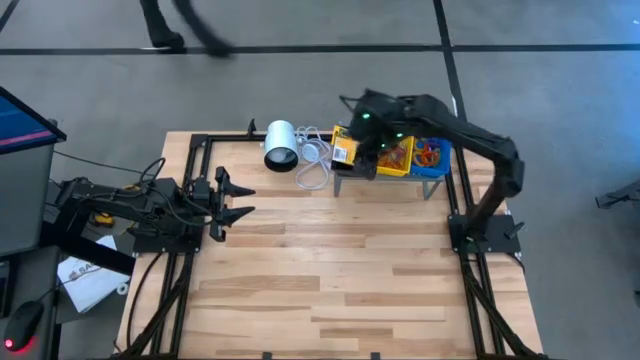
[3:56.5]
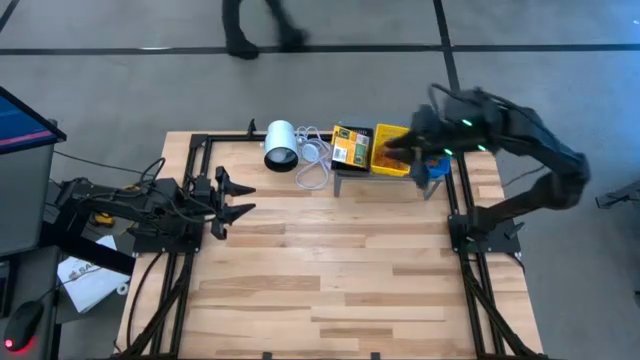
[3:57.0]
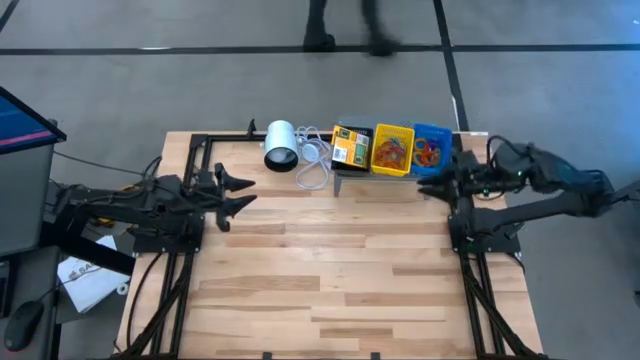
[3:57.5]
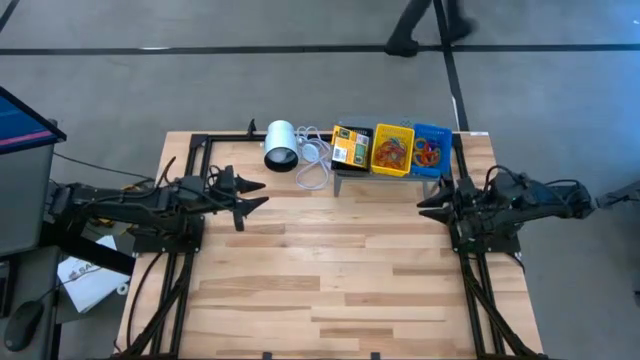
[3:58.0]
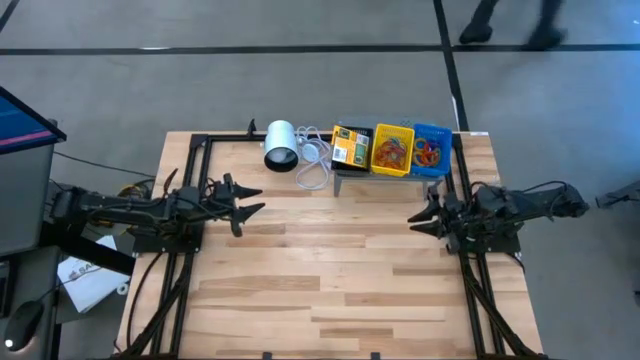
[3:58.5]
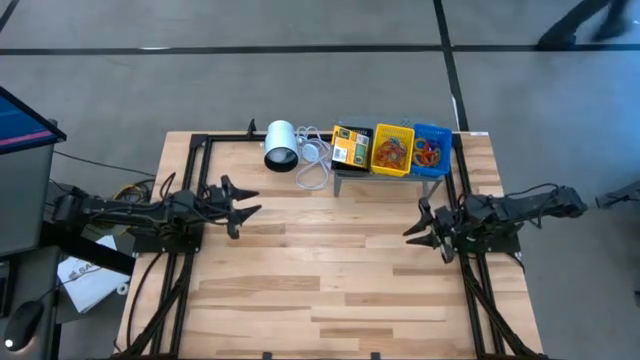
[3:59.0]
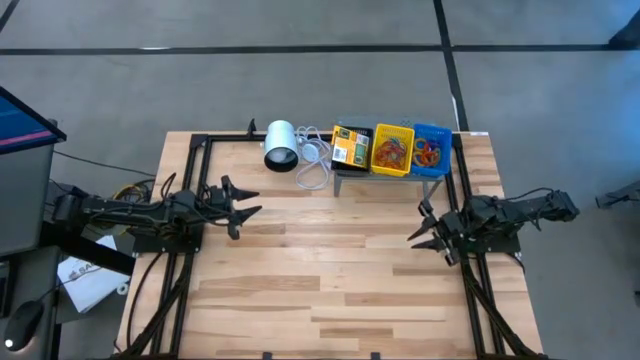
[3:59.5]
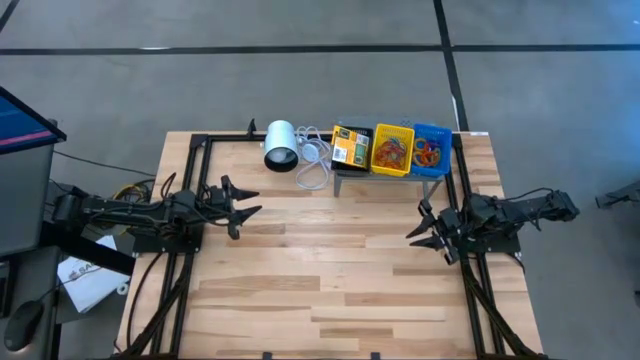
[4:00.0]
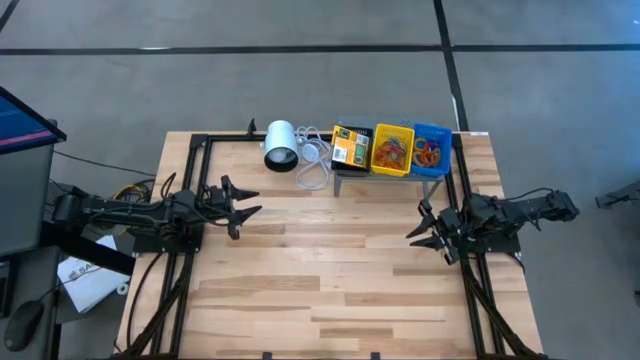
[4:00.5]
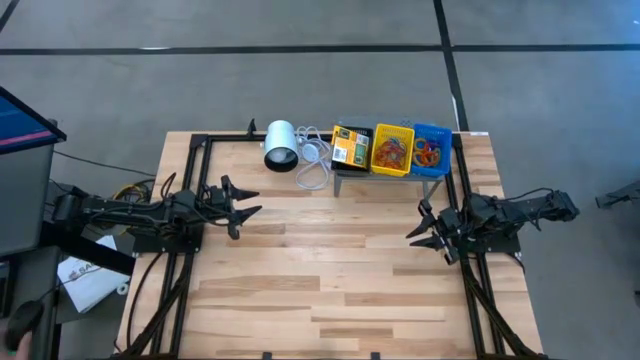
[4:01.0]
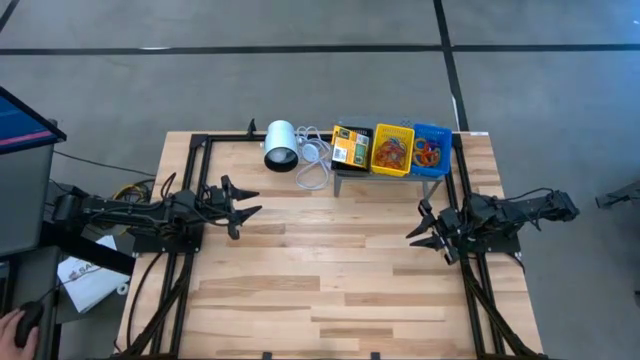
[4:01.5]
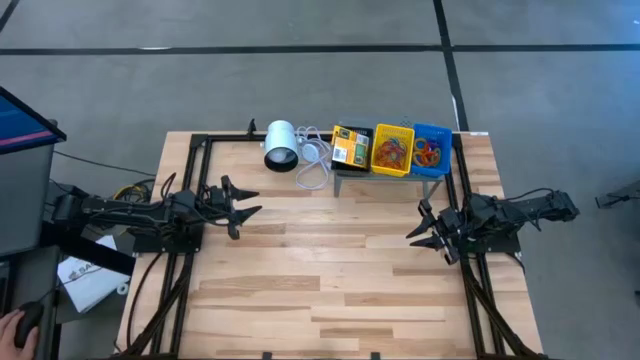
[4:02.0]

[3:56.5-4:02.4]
Task: Pick & Place Office Desk Supplies
Return to Home Position

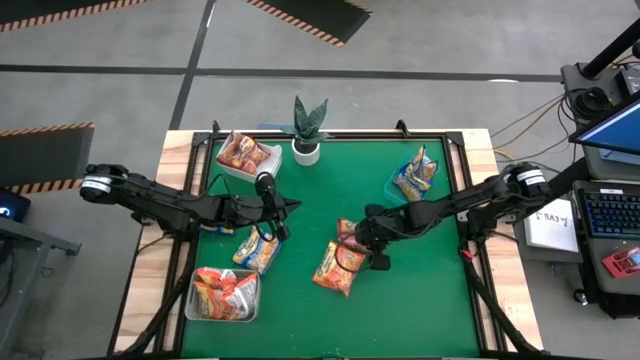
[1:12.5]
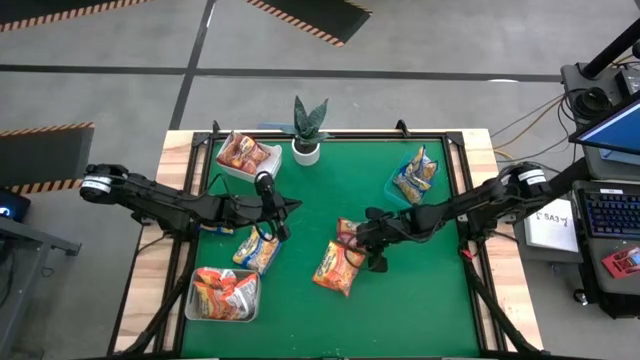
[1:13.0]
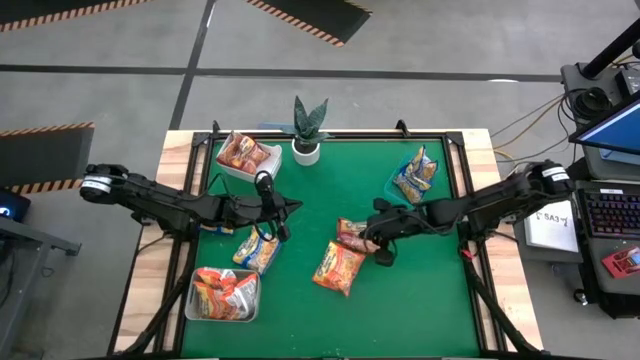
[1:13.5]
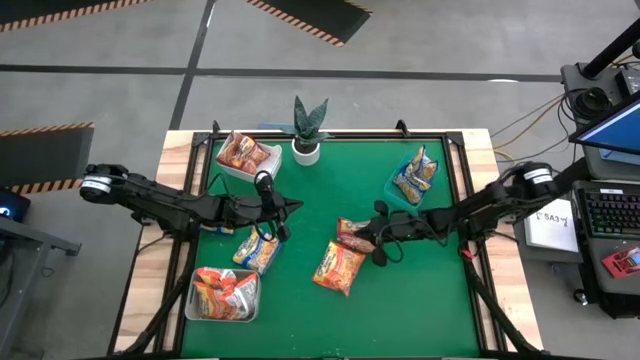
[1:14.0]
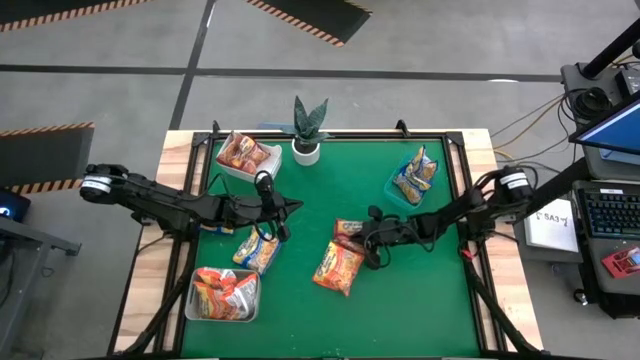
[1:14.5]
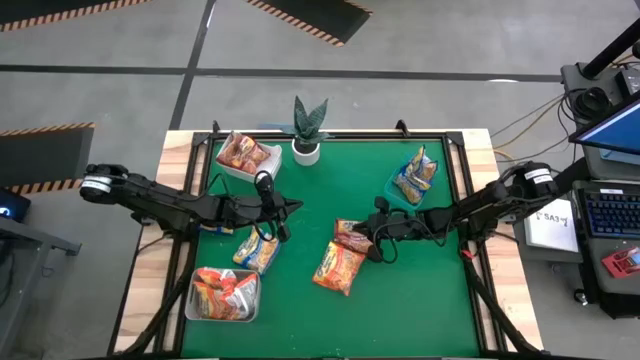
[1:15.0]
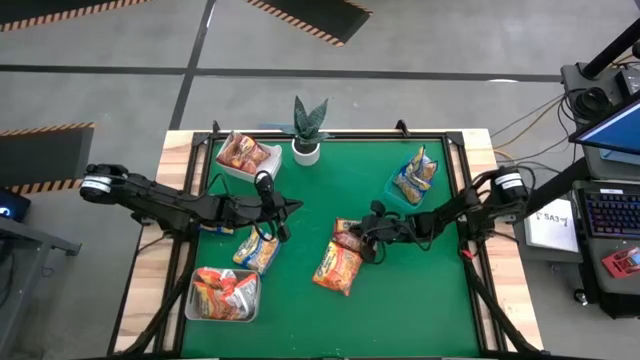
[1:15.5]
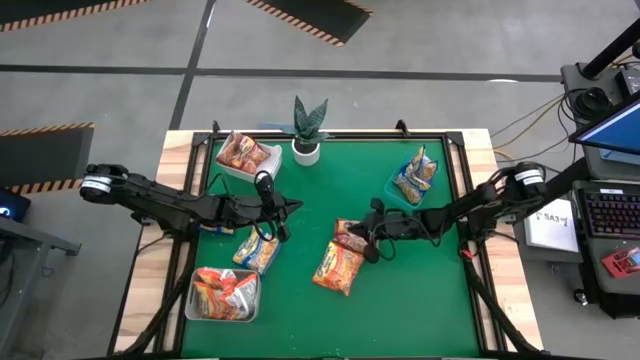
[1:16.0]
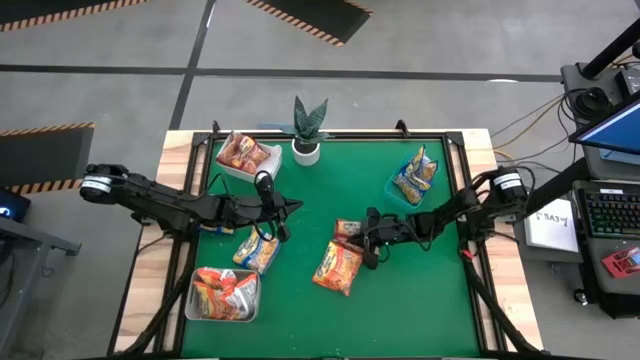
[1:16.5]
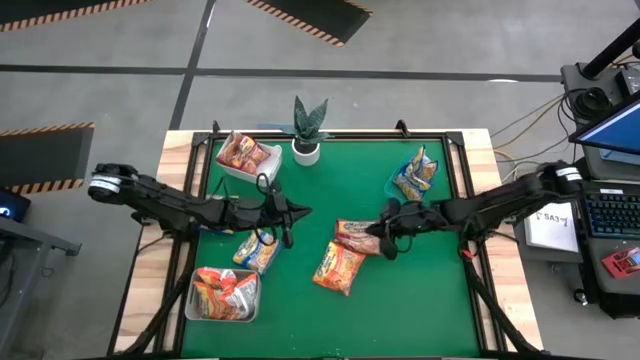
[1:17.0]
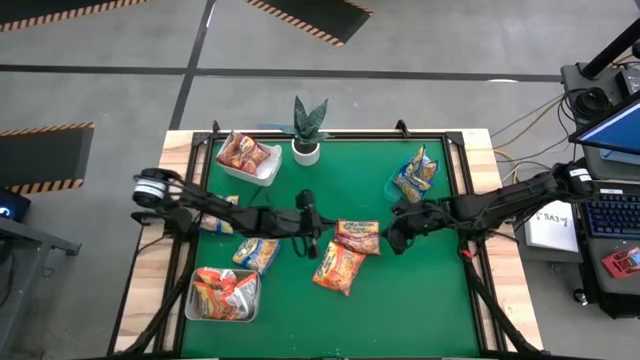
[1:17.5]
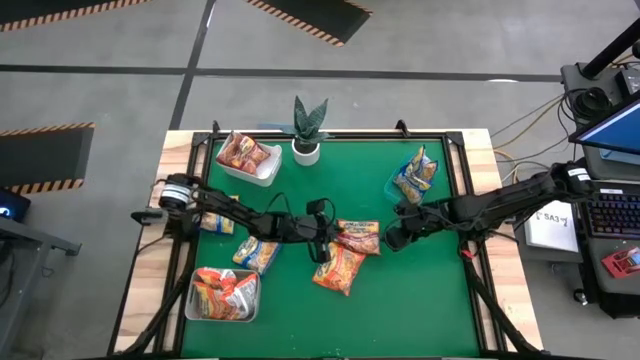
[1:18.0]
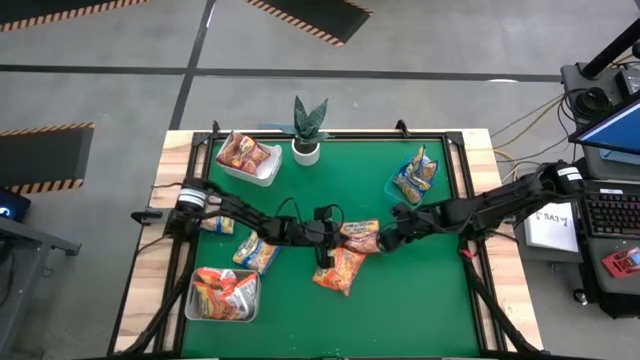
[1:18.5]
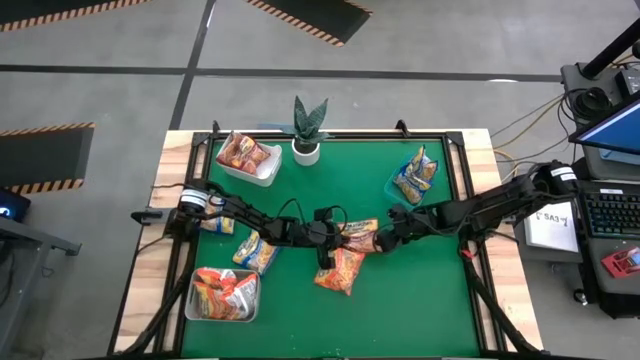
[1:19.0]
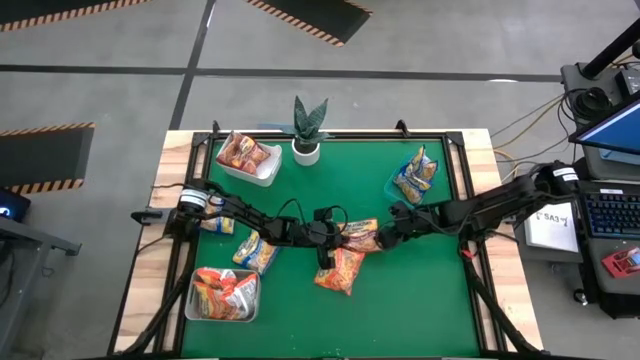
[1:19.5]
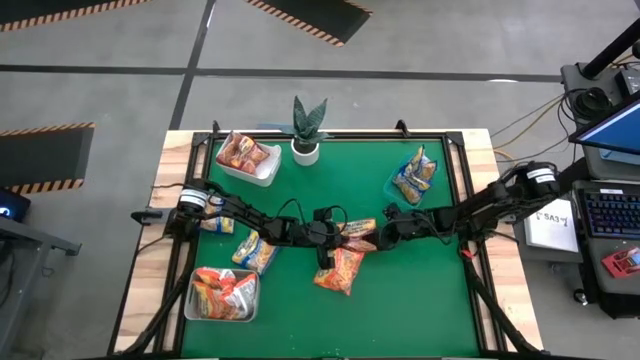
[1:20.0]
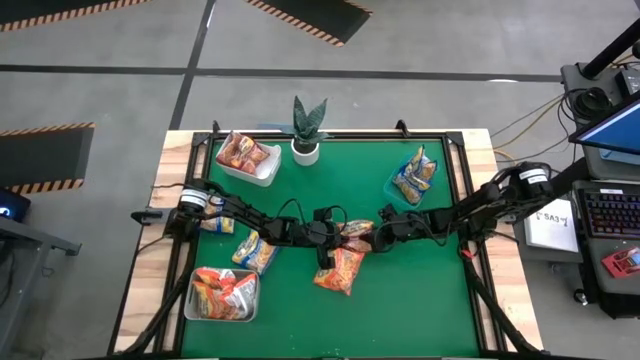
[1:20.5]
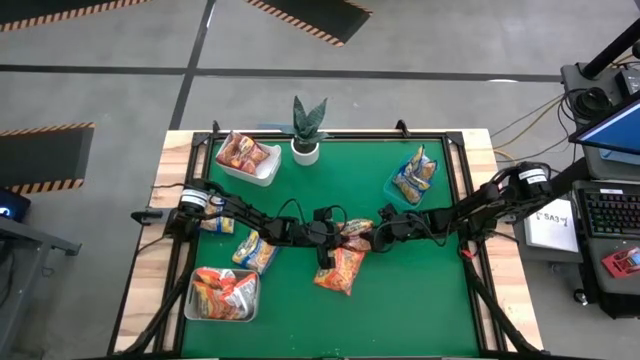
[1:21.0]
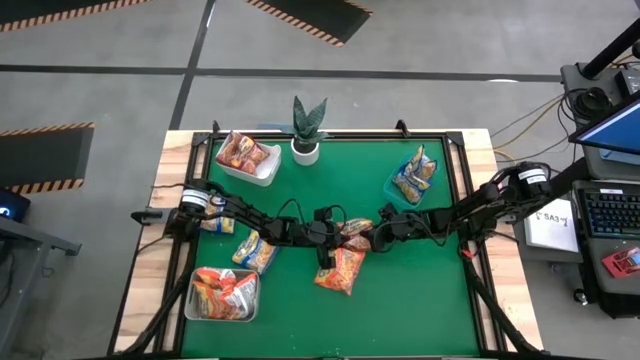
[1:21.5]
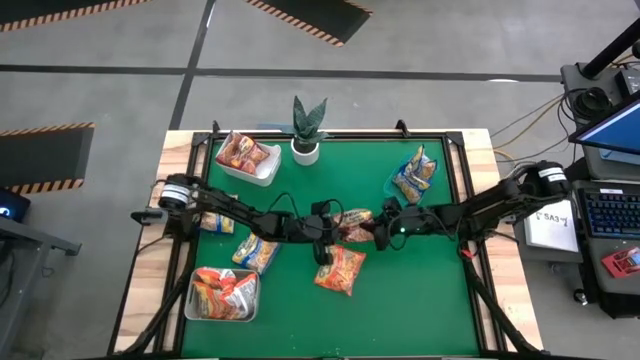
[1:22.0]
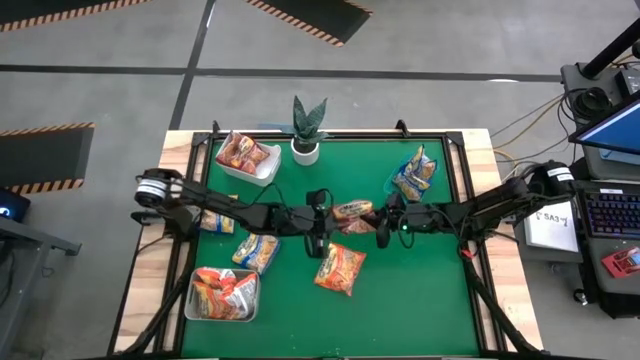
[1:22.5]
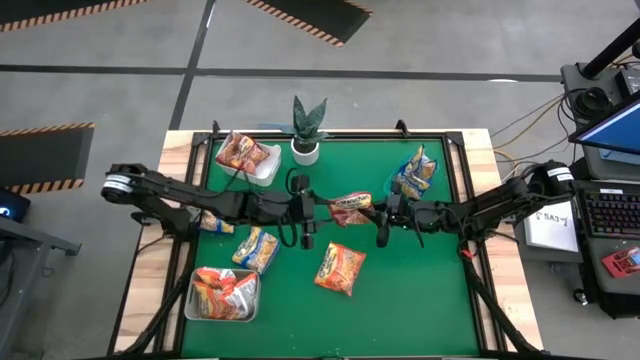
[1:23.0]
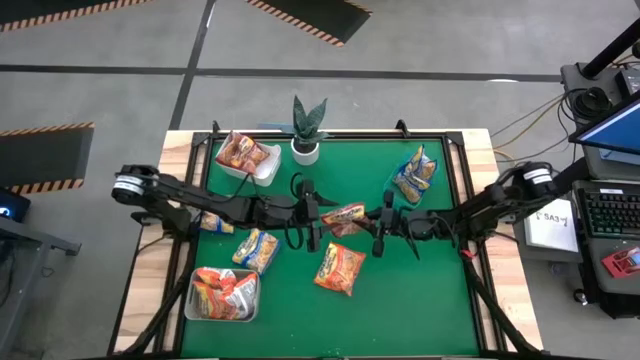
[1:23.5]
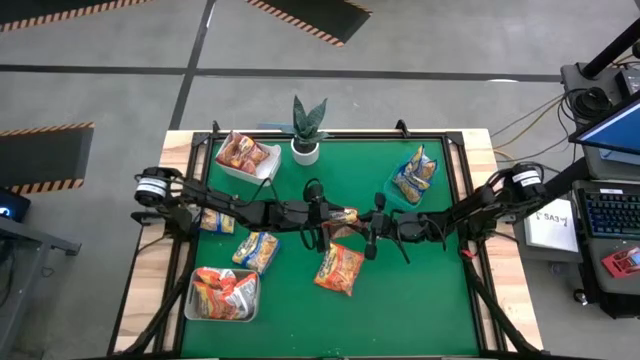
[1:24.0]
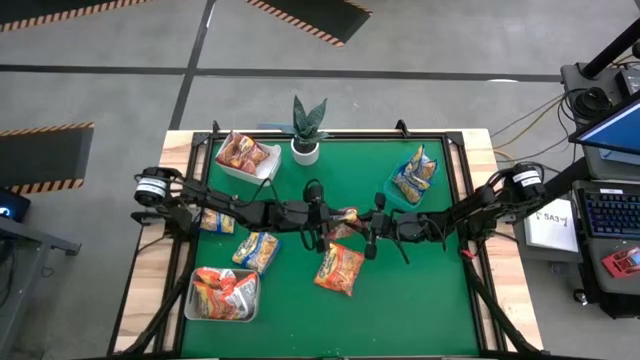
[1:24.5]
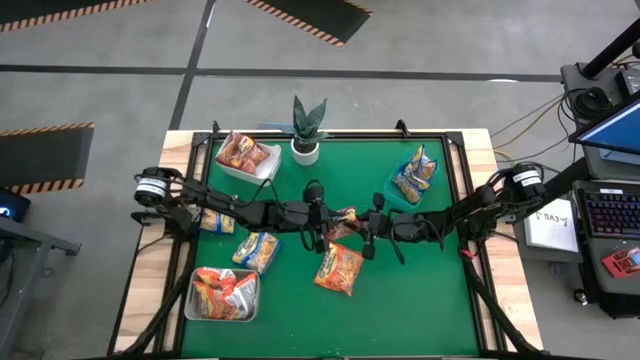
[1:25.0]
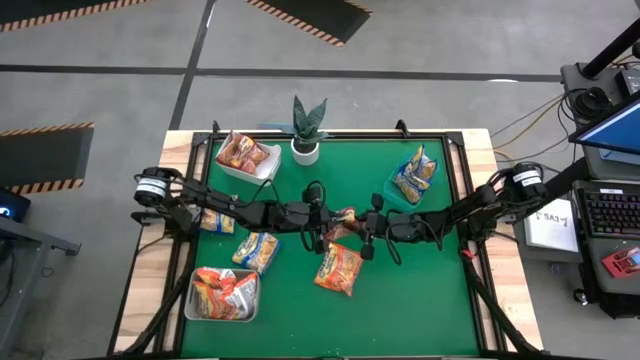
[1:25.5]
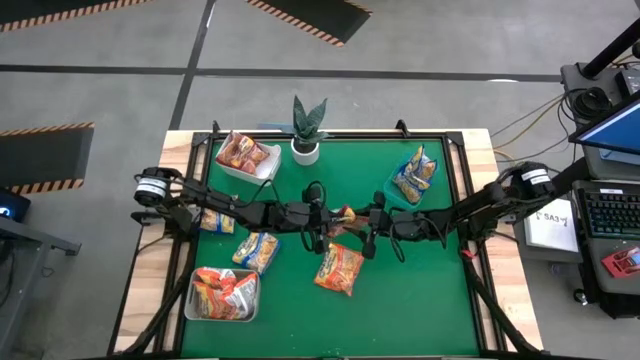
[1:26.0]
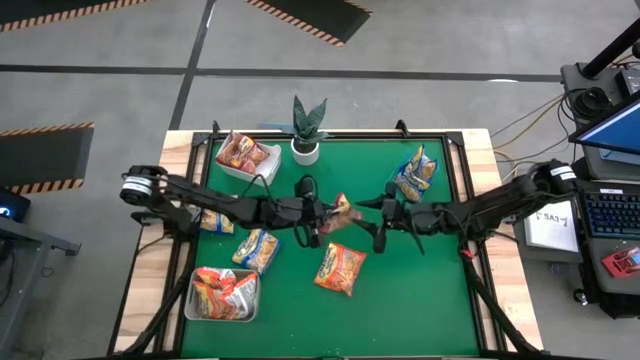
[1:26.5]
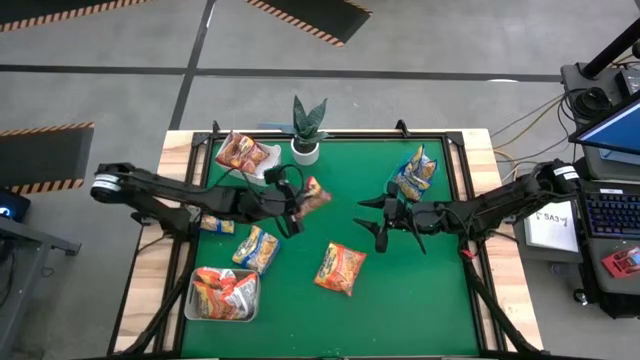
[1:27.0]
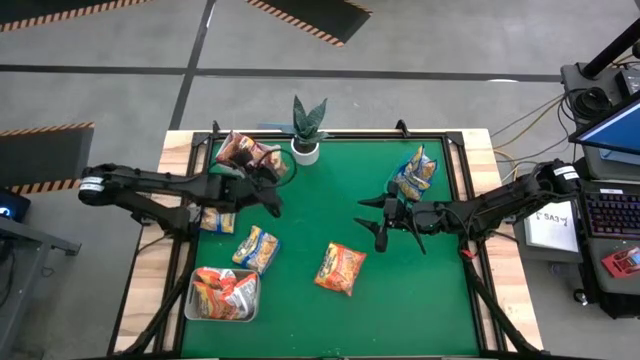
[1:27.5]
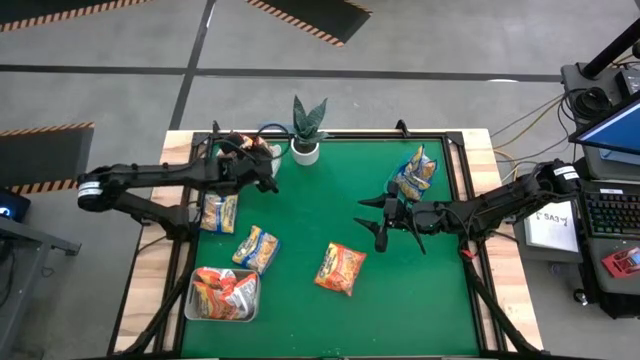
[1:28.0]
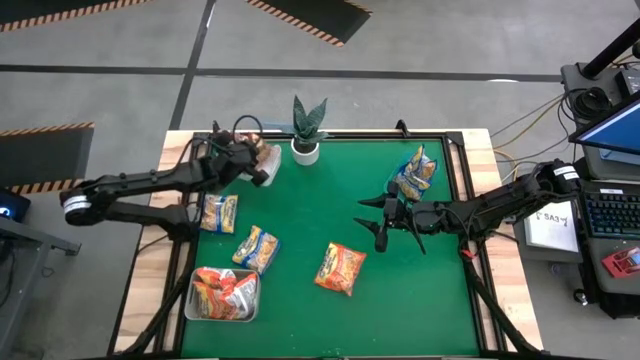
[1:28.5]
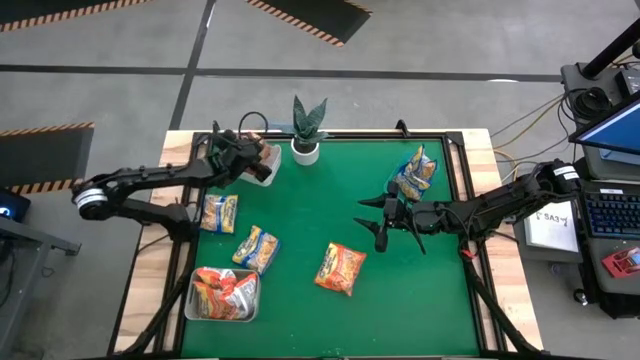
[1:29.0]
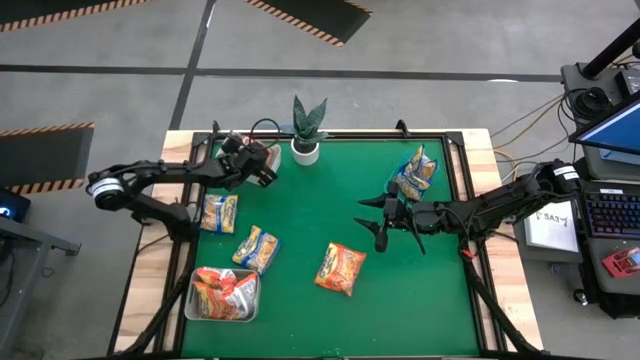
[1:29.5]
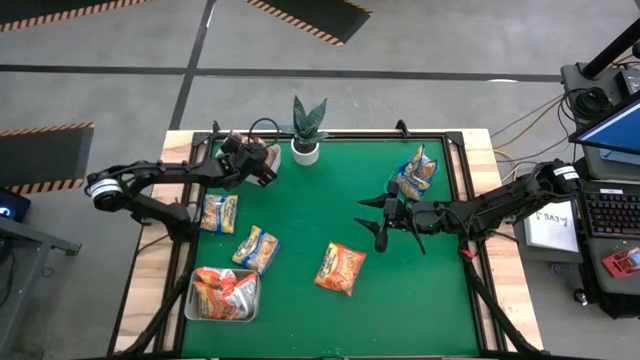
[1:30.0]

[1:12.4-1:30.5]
Task: Sort Maruchan noodles
Put the red noodle pack into the white bin
